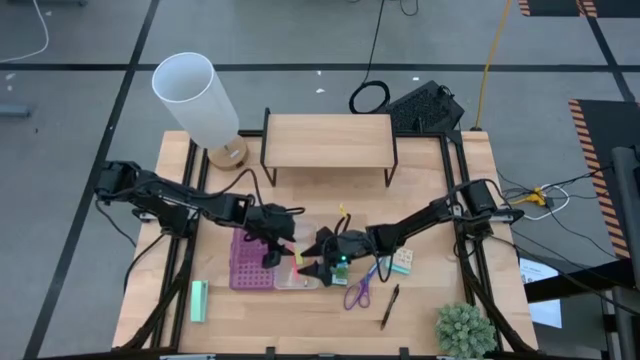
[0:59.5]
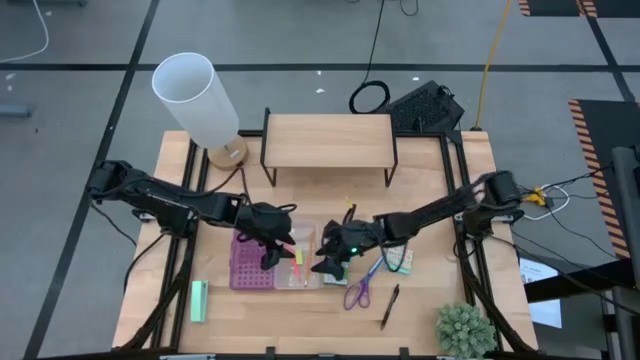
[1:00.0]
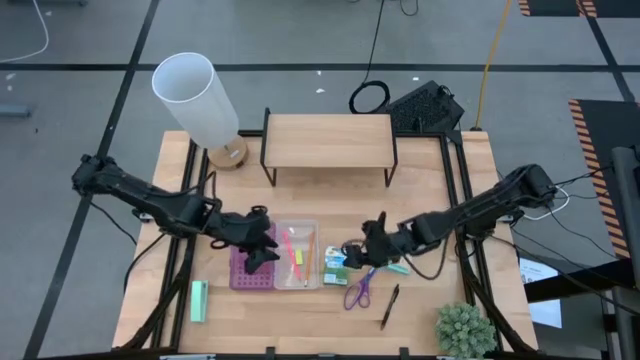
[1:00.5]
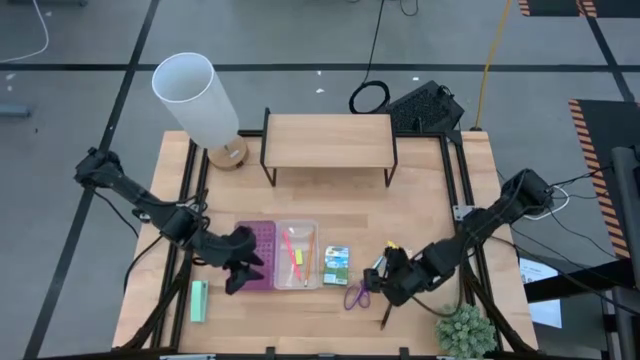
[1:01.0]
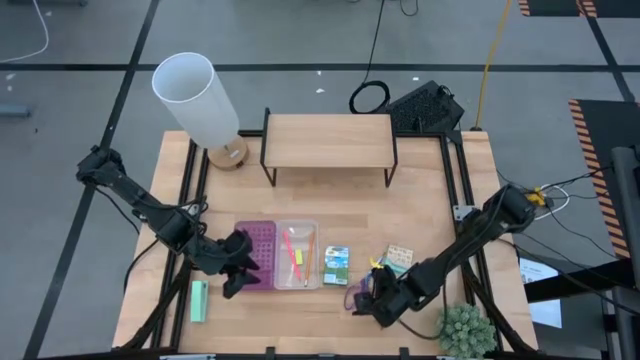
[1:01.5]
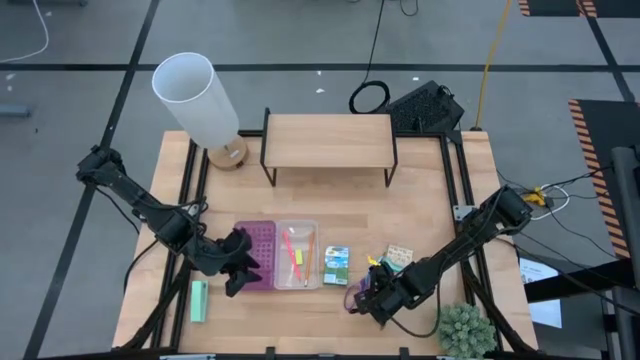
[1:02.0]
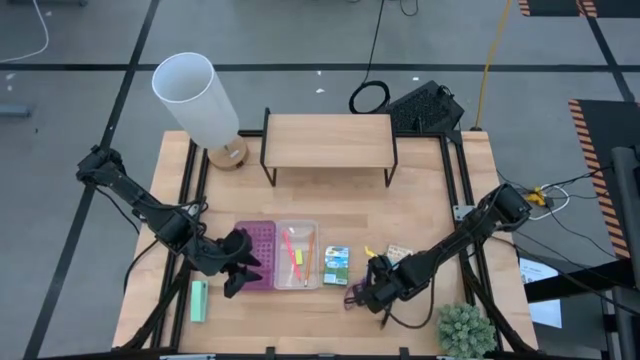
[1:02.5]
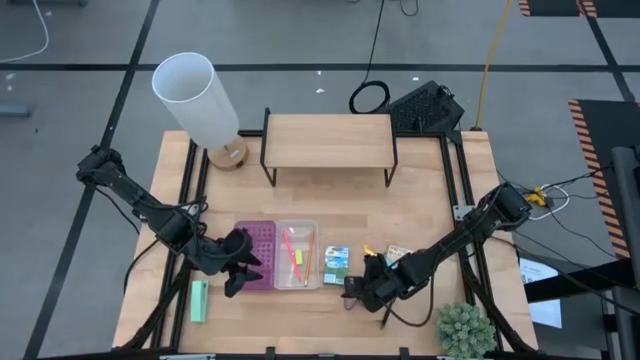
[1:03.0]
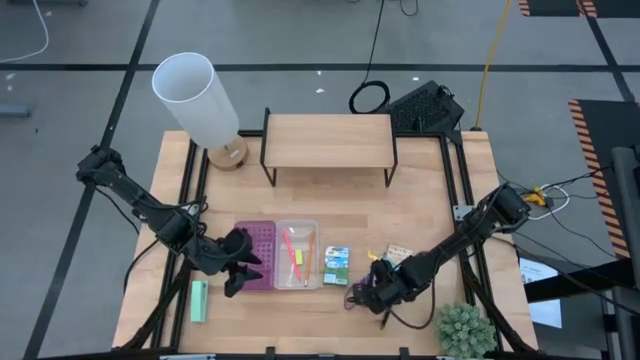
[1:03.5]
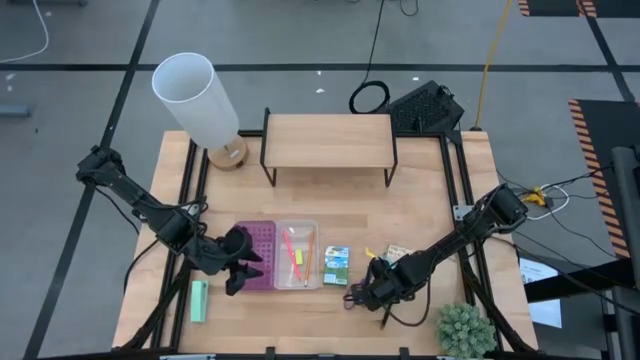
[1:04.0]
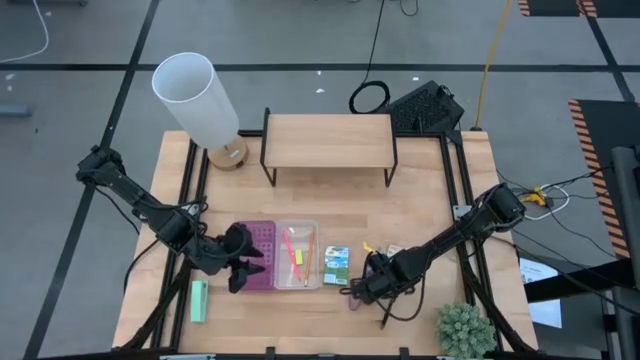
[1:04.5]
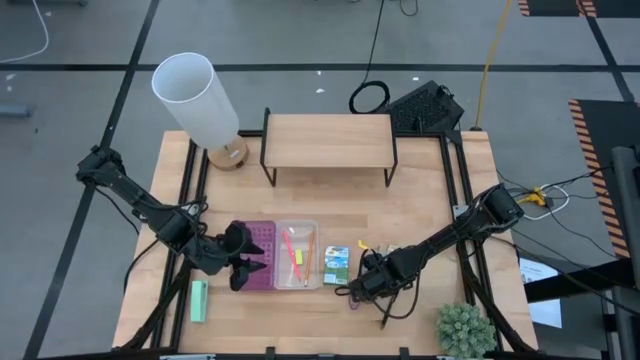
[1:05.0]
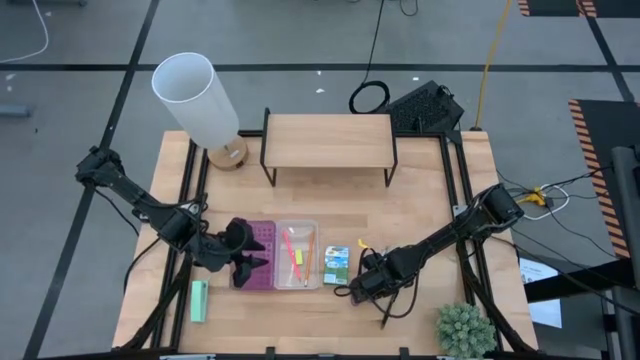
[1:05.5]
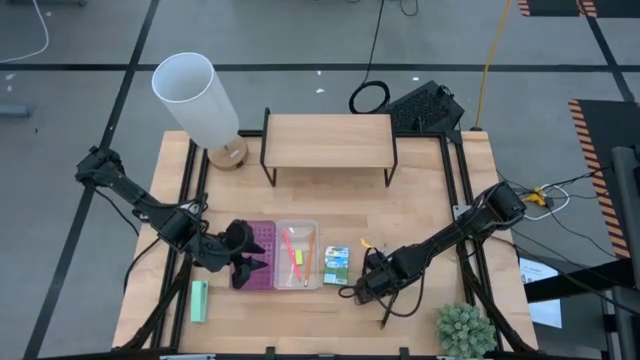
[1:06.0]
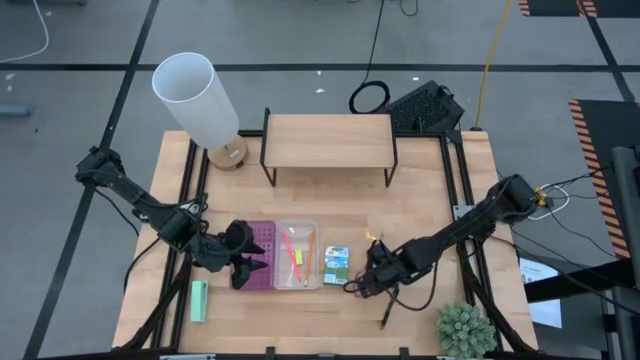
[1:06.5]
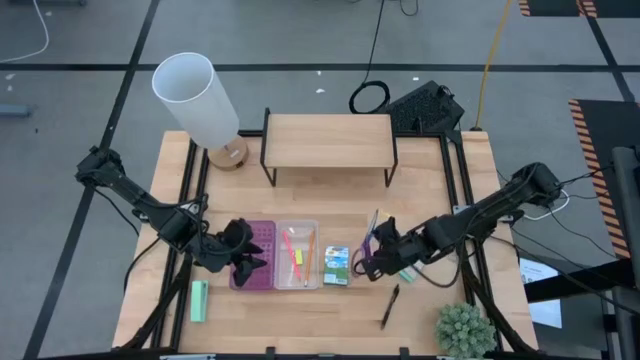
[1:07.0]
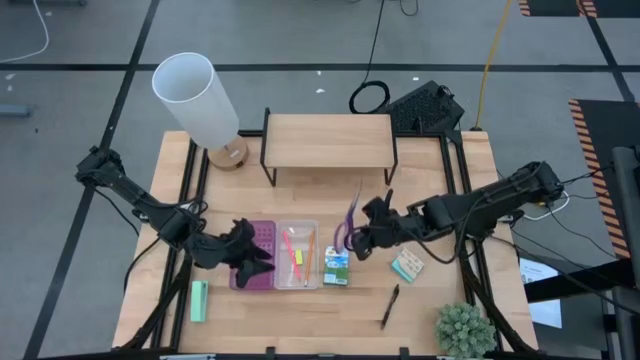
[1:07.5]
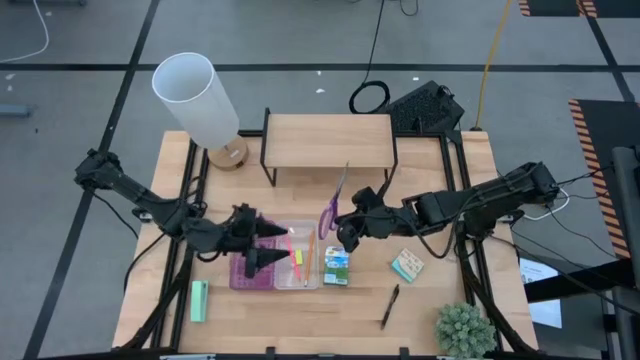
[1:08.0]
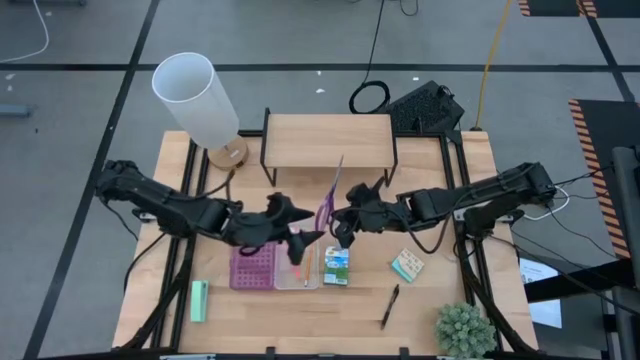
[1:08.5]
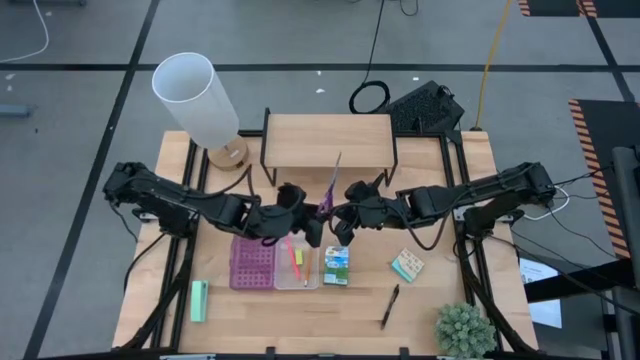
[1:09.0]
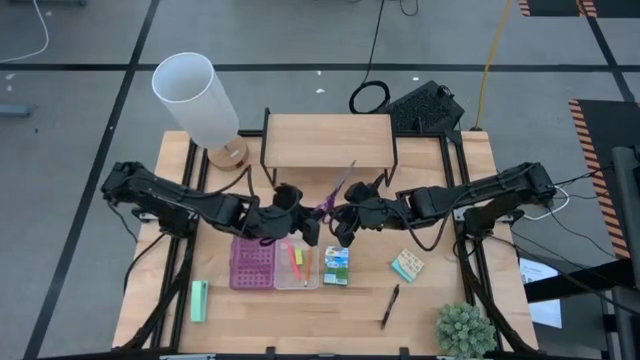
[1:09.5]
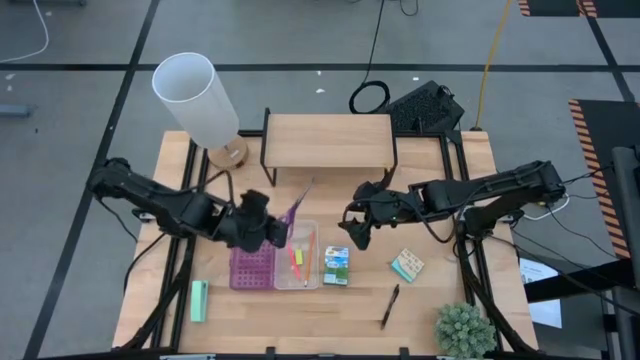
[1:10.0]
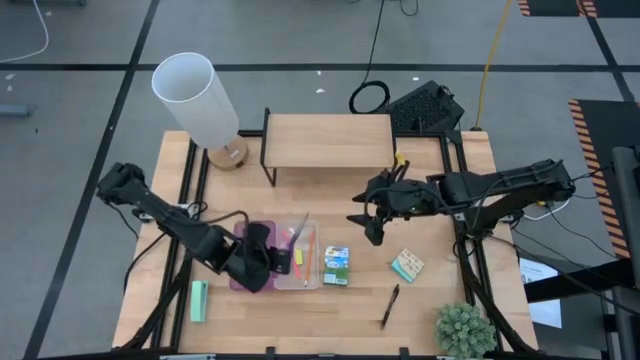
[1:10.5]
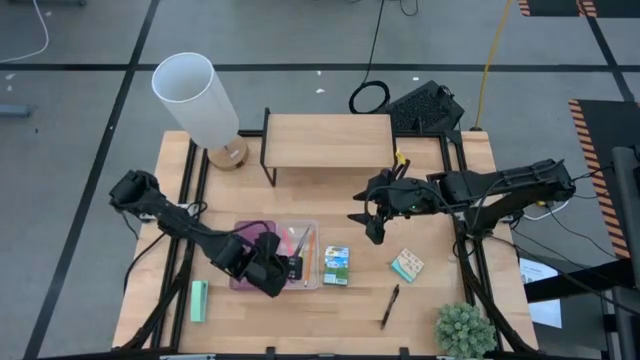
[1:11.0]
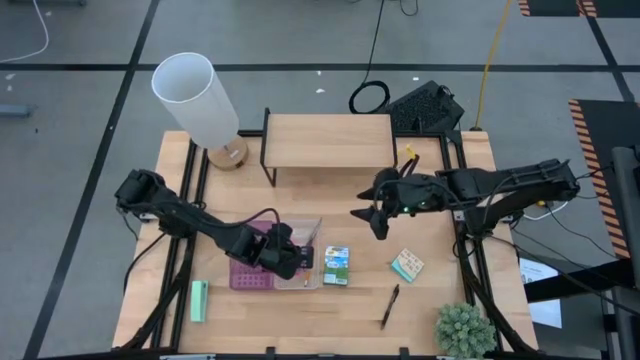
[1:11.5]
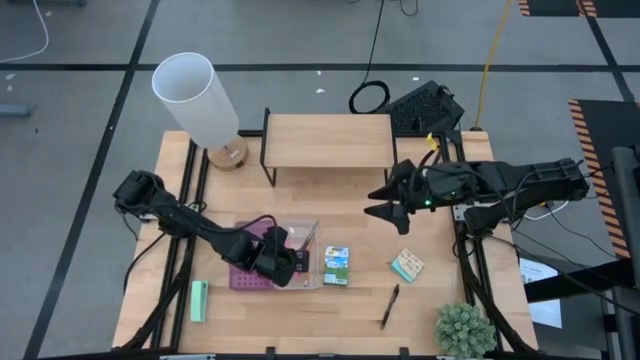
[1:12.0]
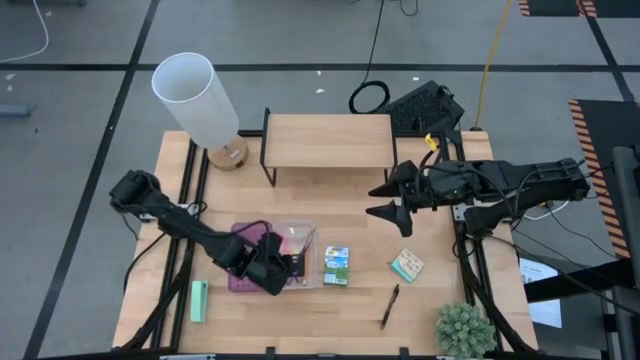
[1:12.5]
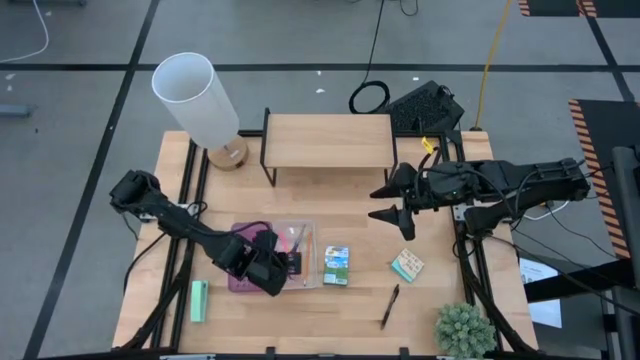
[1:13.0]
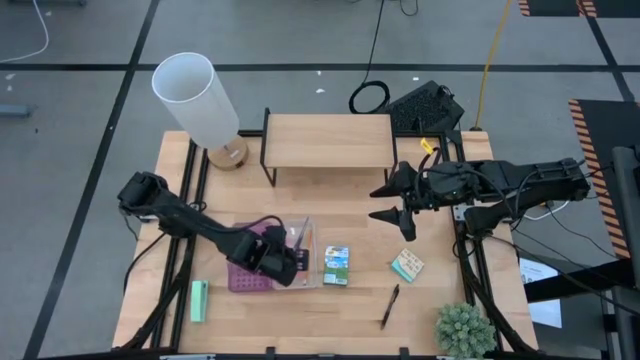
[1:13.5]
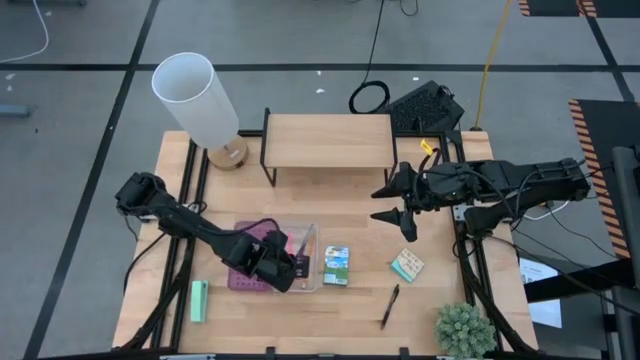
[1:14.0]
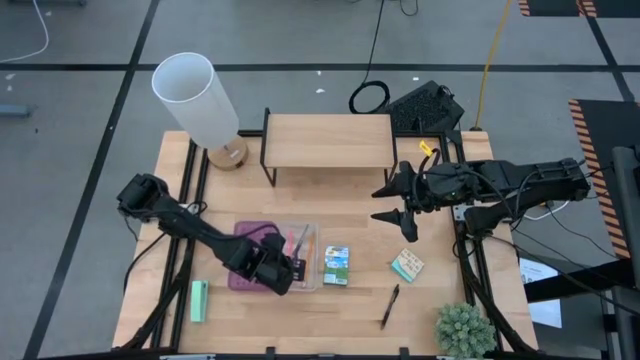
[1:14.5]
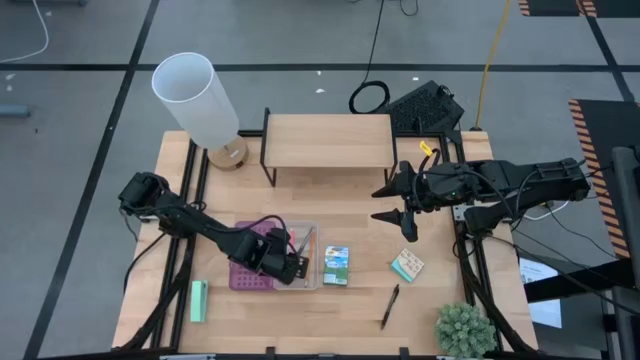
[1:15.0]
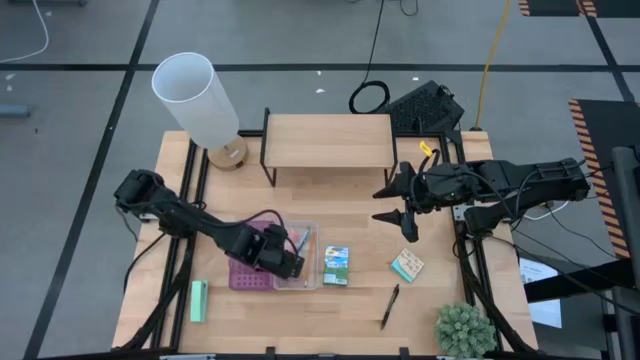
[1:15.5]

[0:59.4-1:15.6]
Task: Pack school essentials
Put the violet scissors into the violet supply box
